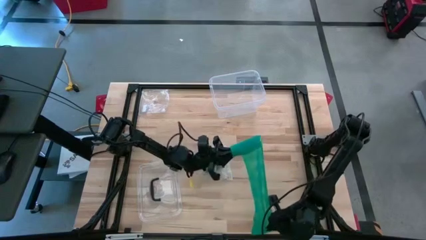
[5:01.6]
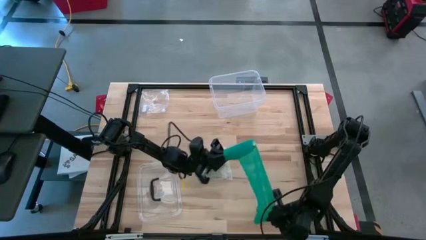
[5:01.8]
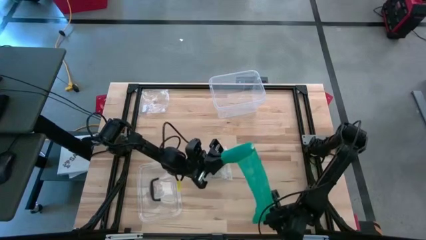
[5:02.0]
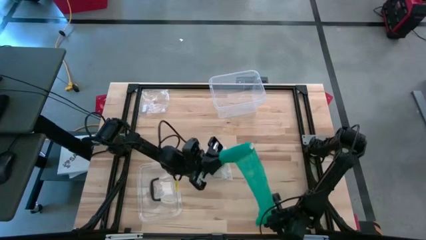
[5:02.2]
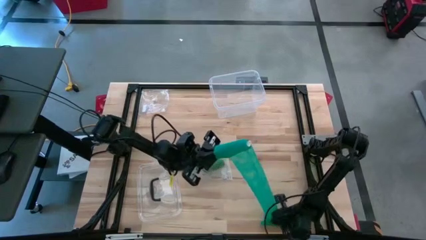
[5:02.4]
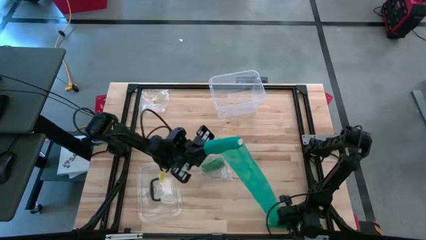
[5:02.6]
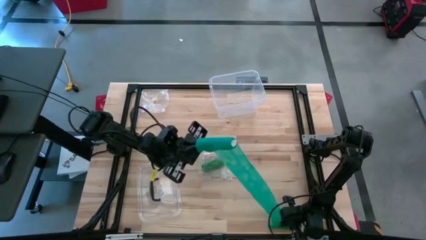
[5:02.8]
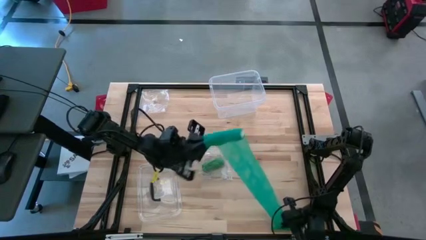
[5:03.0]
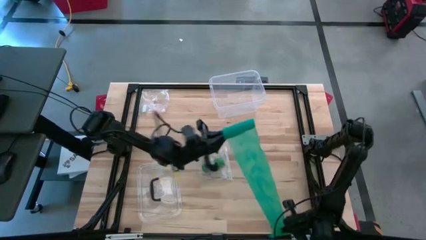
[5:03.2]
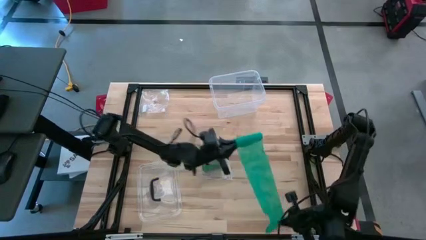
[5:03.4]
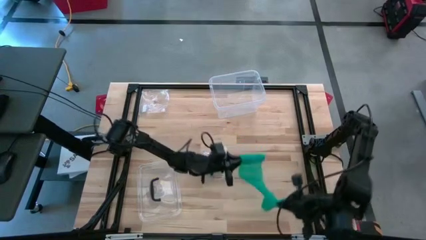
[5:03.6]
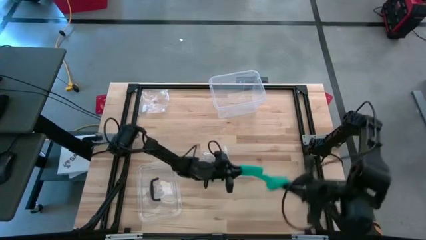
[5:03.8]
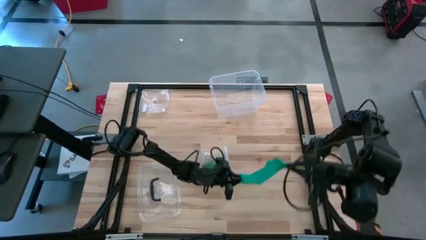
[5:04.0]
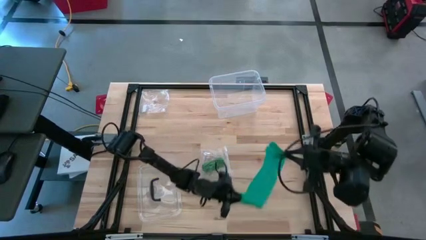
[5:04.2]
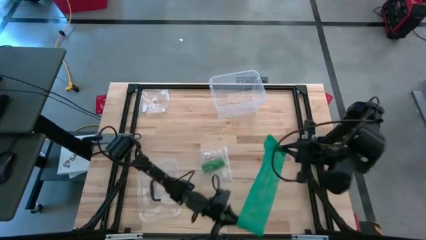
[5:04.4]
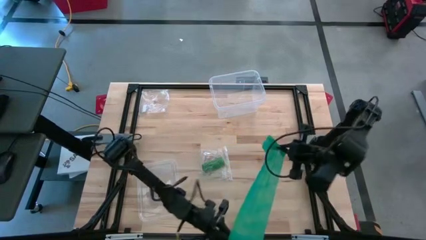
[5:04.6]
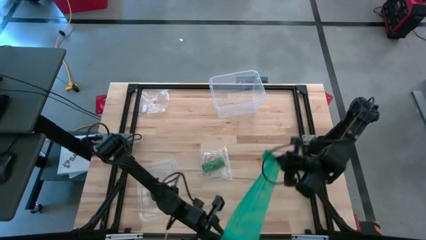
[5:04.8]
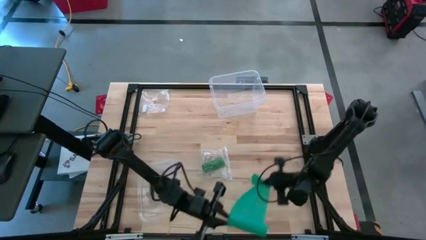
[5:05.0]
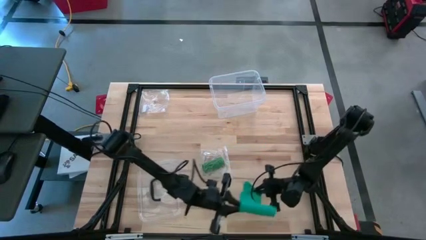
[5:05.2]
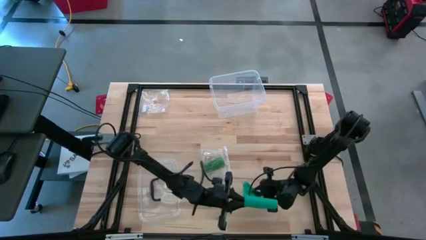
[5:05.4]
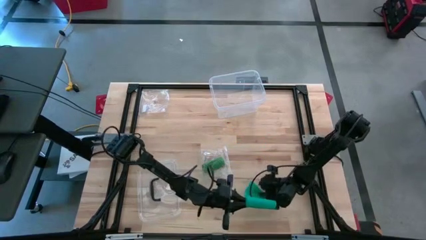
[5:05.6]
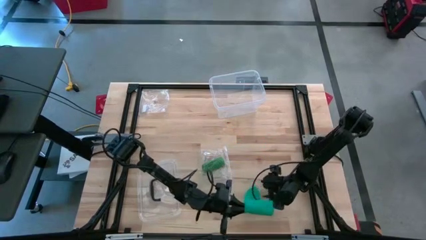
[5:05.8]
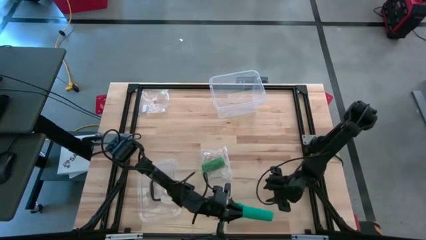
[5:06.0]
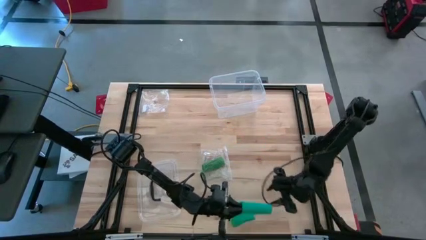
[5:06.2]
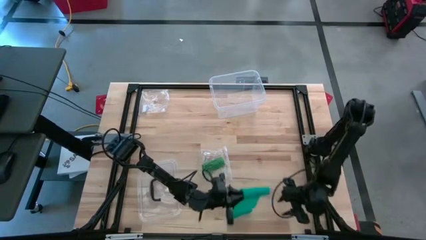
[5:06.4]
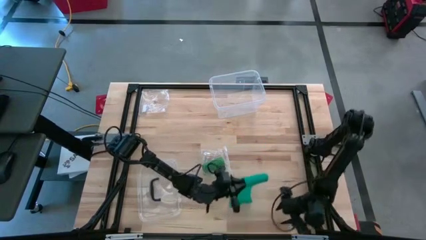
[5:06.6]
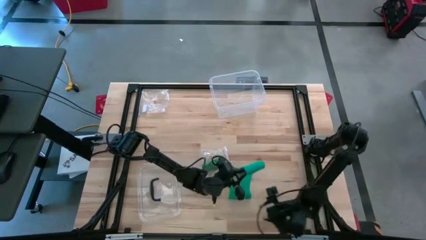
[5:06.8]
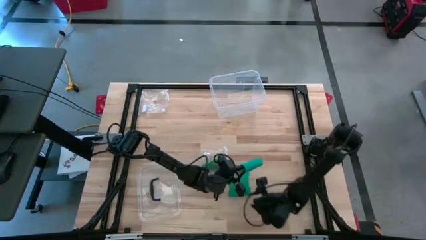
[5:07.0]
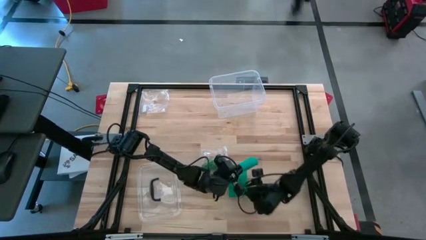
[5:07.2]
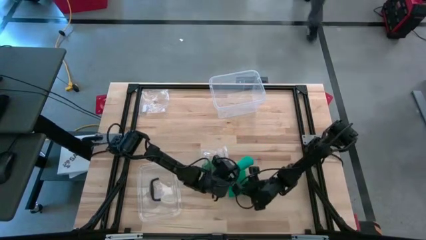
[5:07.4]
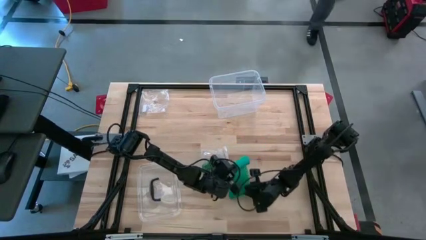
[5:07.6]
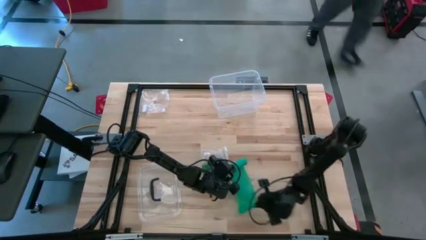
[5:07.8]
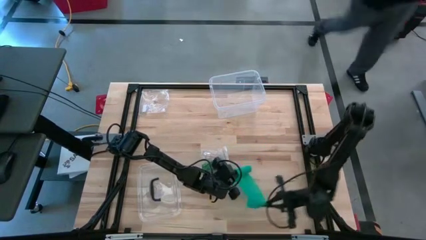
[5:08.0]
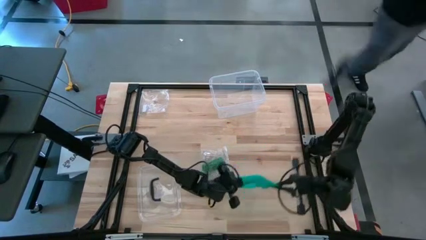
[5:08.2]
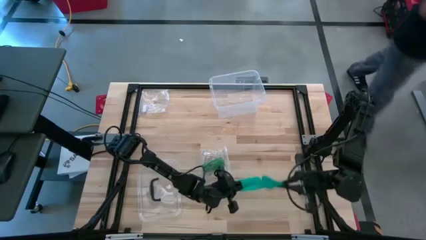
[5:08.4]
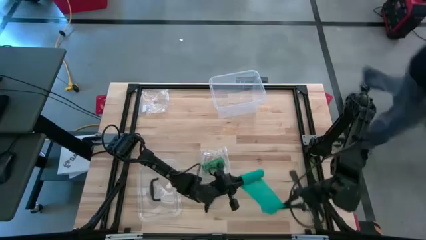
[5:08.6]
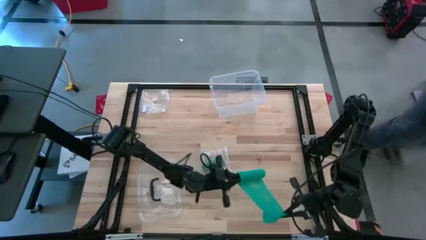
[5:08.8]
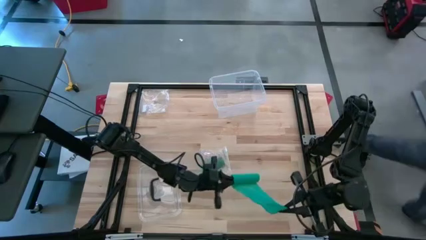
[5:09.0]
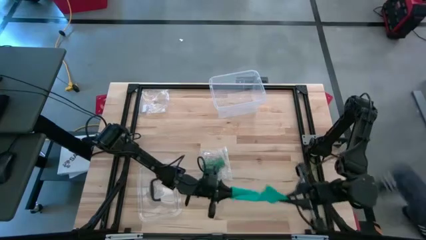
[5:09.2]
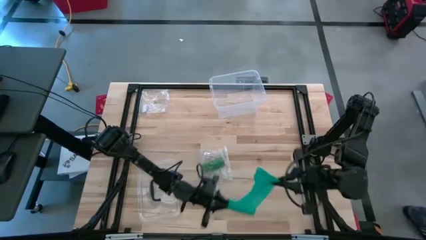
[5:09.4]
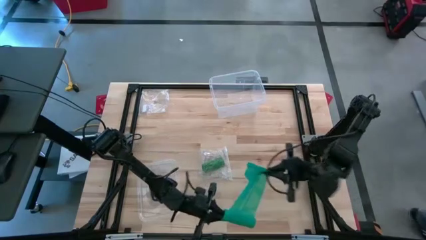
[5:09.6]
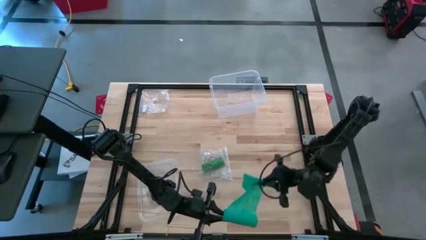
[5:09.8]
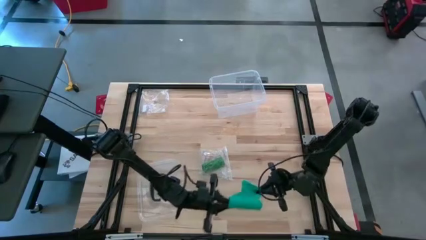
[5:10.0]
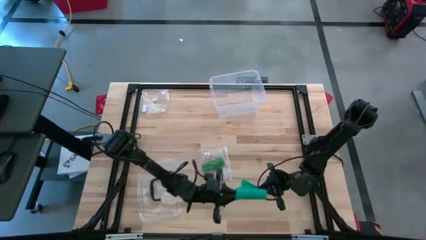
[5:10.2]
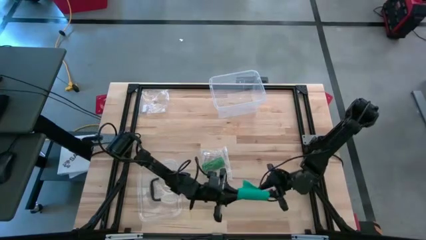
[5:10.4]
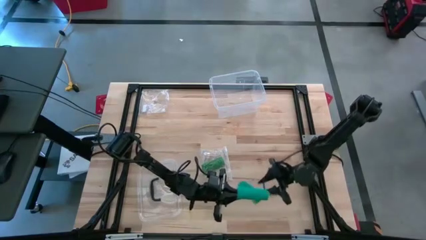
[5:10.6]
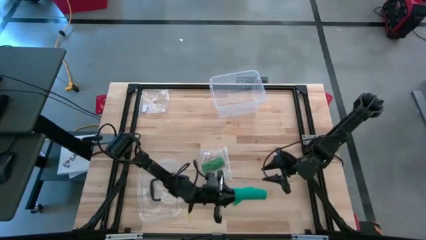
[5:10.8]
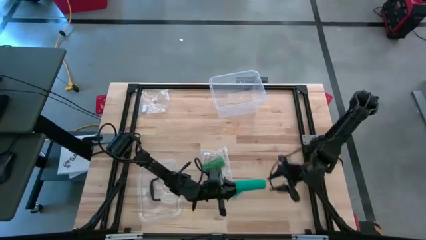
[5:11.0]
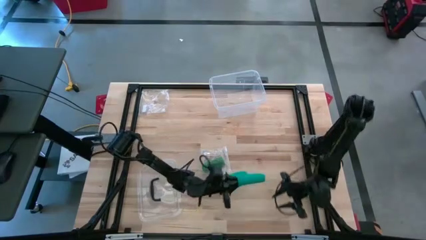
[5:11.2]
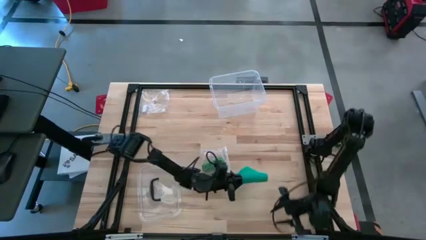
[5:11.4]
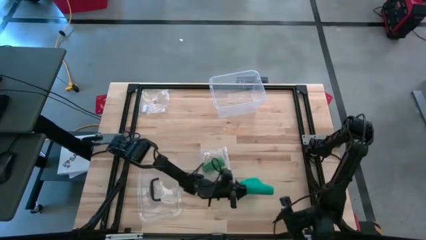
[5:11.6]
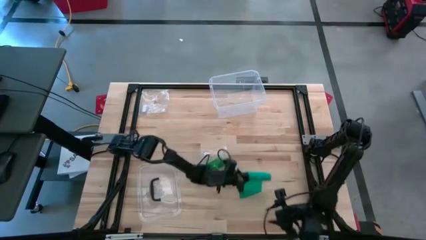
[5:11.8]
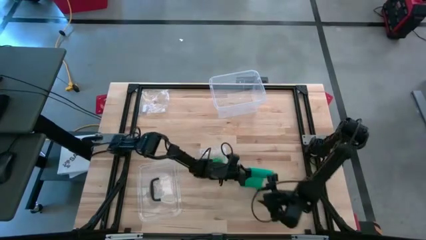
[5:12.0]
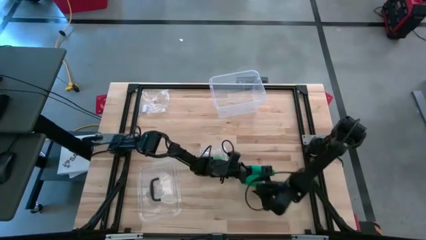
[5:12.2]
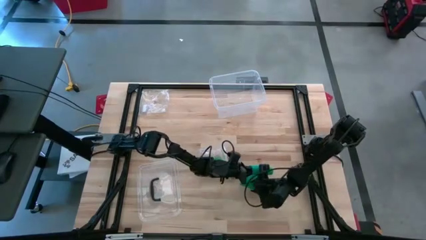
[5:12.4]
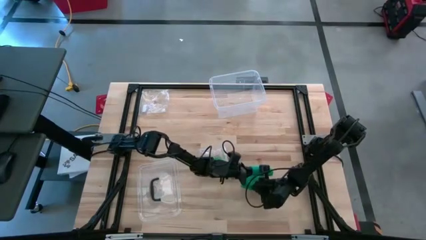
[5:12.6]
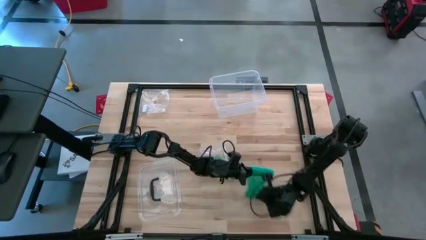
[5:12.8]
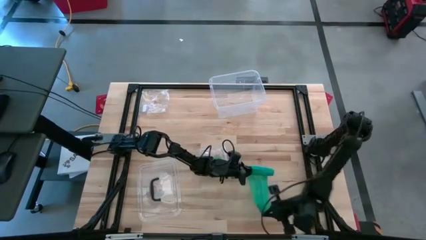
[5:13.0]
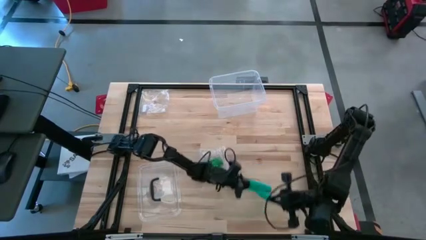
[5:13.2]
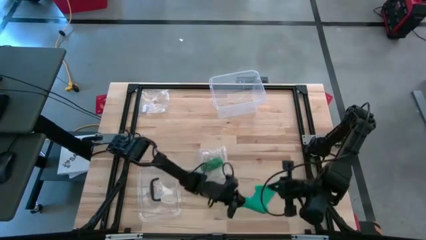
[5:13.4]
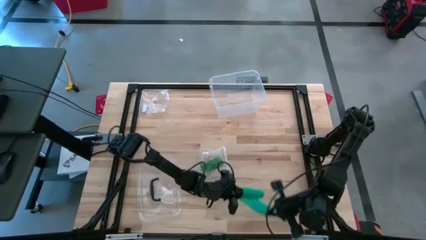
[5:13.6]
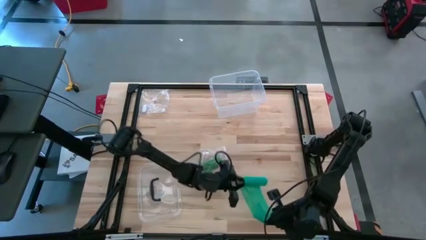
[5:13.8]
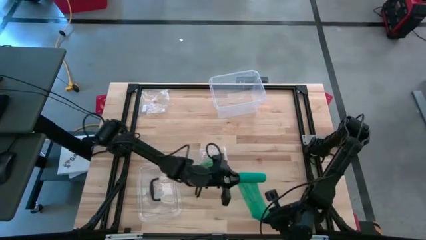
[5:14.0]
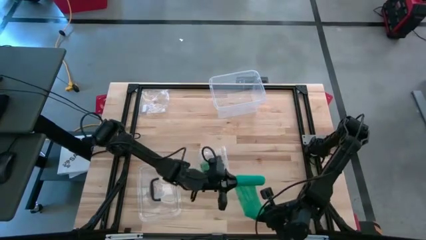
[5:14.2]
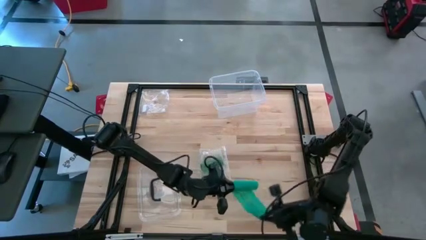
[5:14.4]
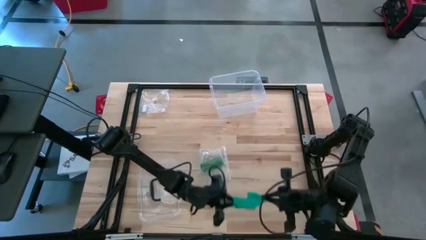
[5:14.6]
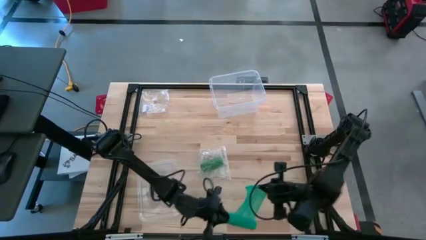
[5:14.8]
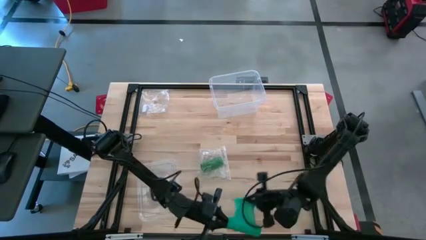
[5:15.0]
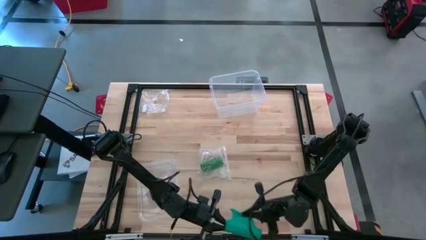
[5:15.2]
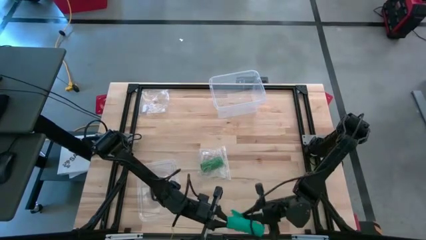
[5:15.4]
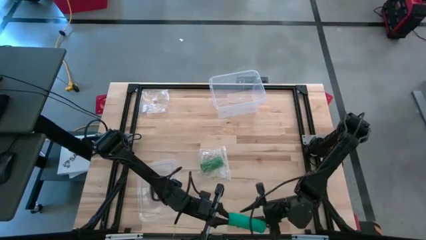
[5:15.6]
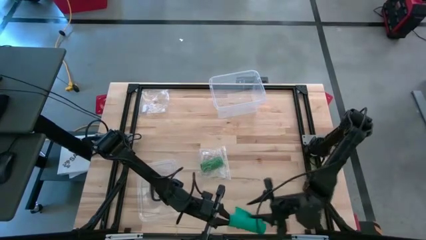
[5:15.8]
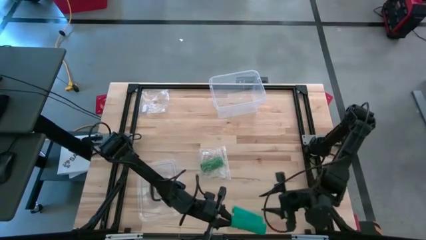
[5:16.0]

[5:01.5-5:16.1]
Task: Roll bandage
Roll the blue bandage

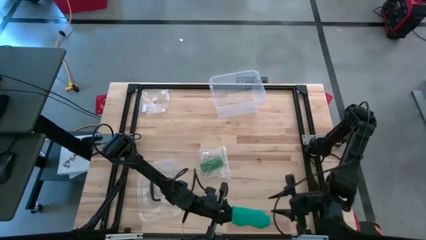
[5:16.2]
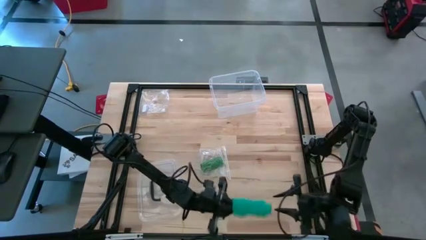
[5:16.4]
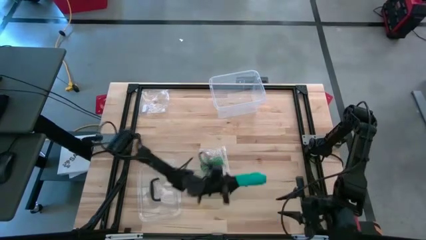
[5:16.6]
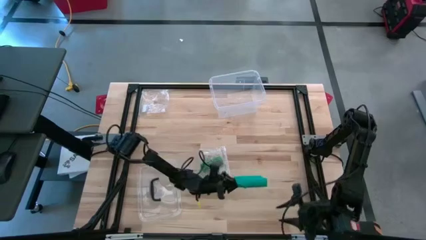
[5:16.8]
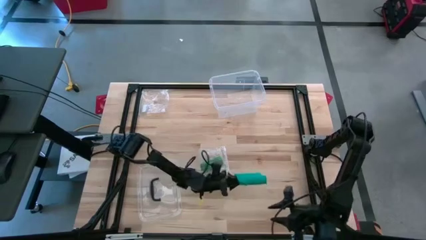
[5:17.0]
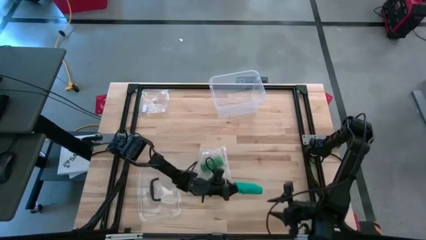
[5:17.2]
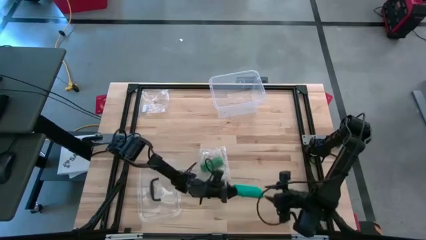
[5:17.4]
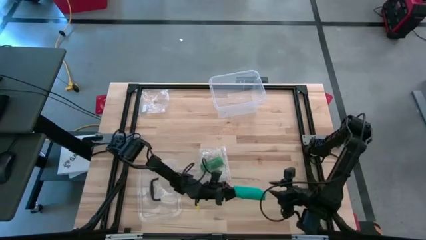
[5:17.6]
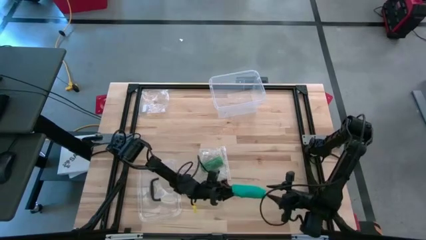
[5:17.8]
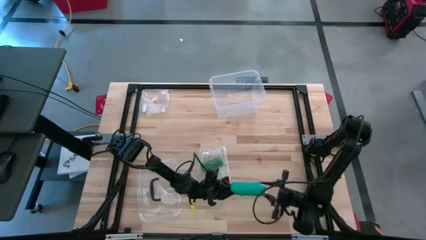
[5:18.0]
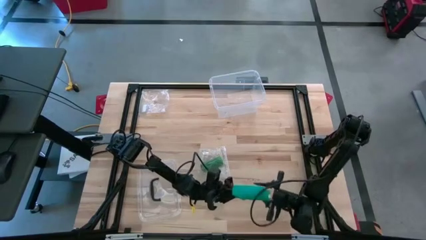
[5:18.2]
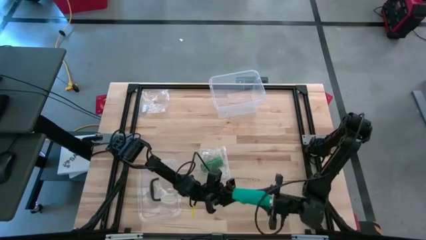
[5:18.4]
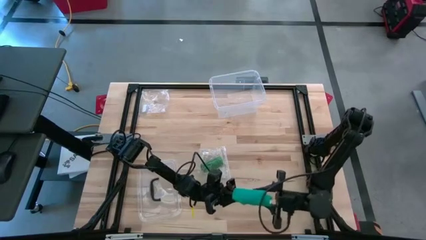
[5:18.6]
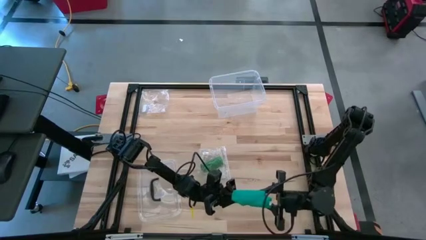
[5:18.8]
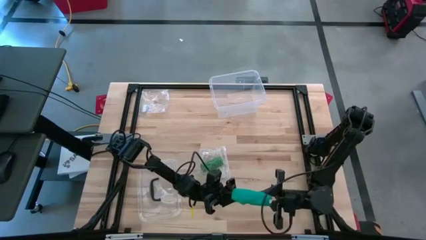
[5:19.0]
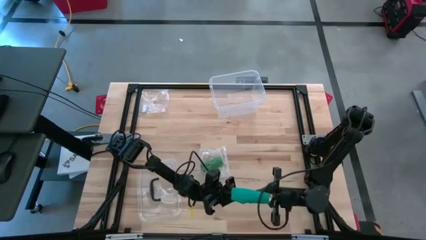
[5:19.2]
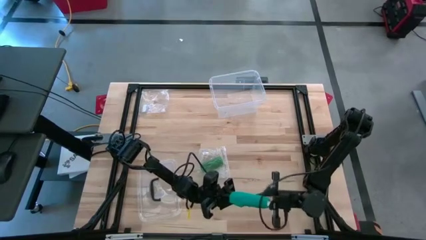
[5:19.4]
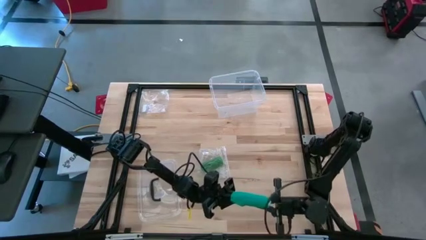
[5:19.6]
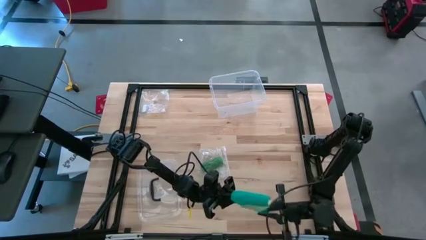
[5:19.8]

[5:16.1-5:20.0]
Roll the blue bandage
